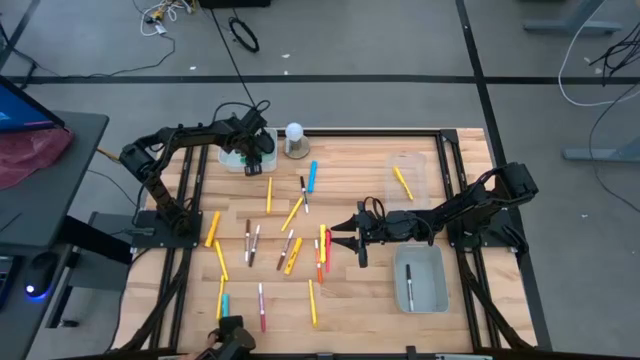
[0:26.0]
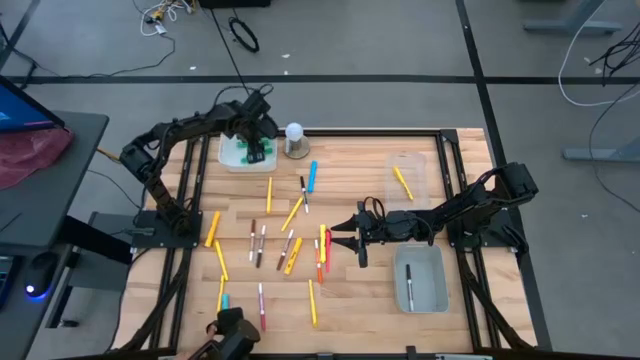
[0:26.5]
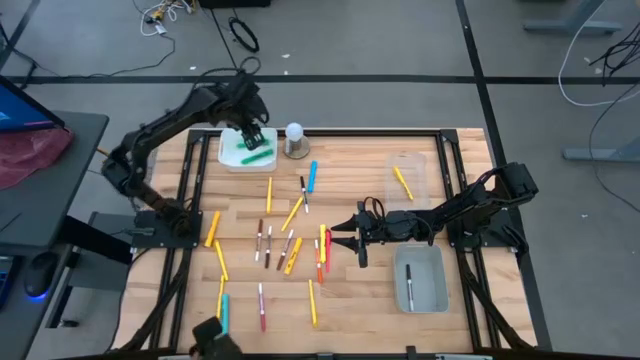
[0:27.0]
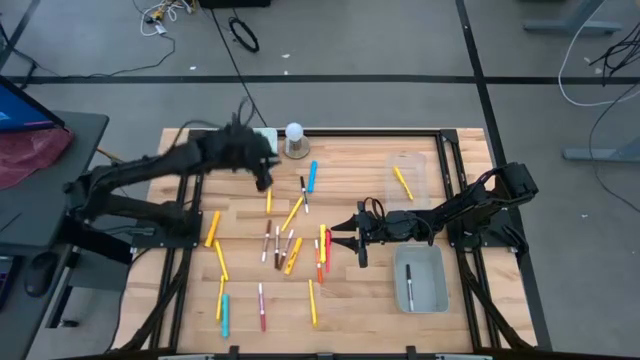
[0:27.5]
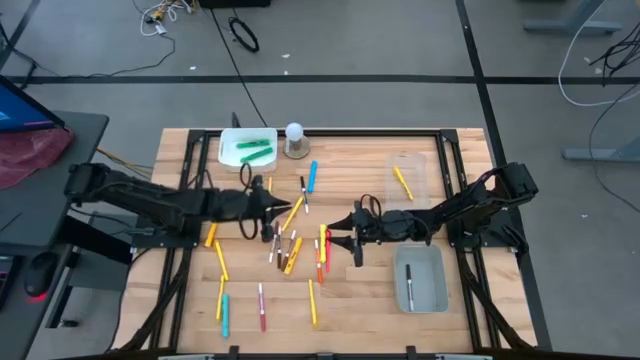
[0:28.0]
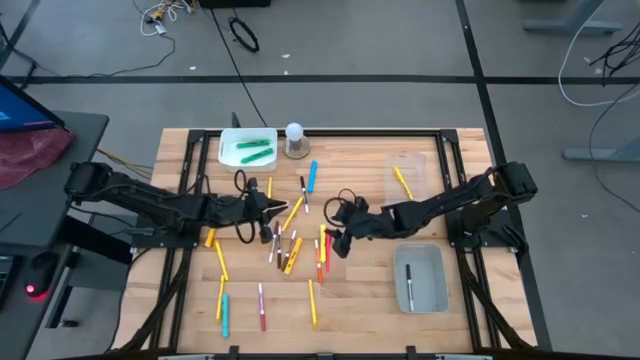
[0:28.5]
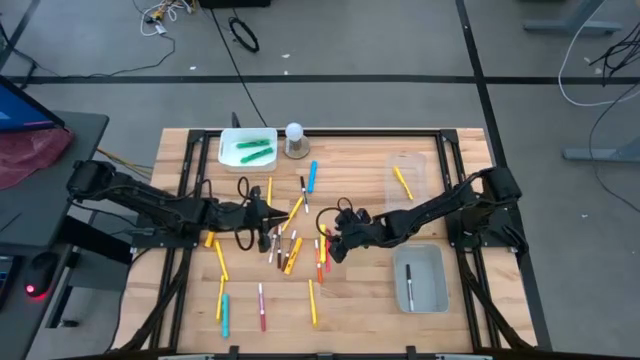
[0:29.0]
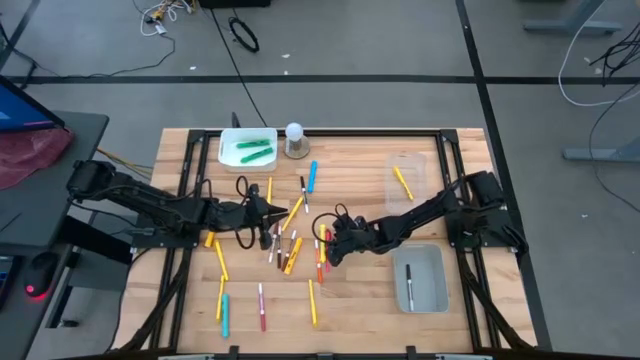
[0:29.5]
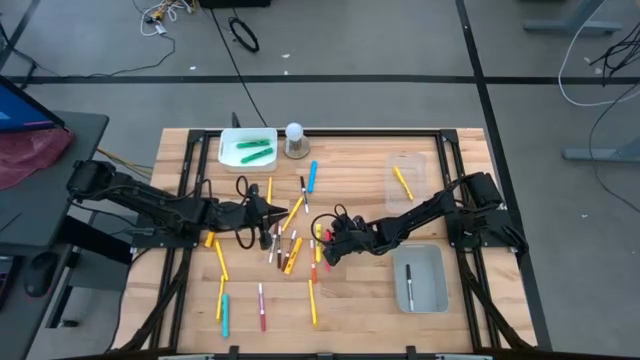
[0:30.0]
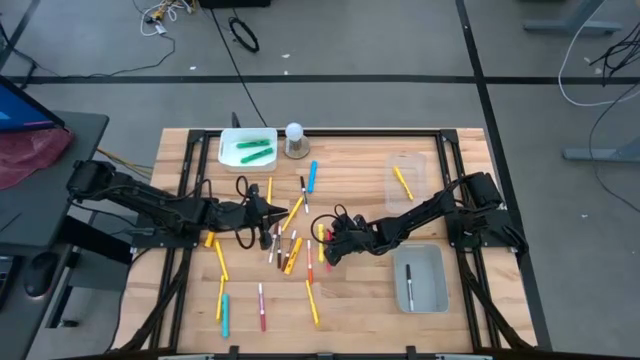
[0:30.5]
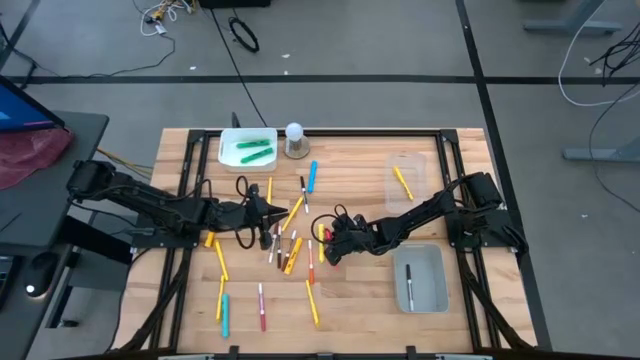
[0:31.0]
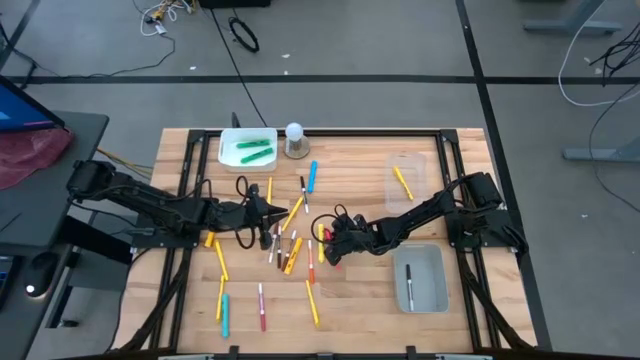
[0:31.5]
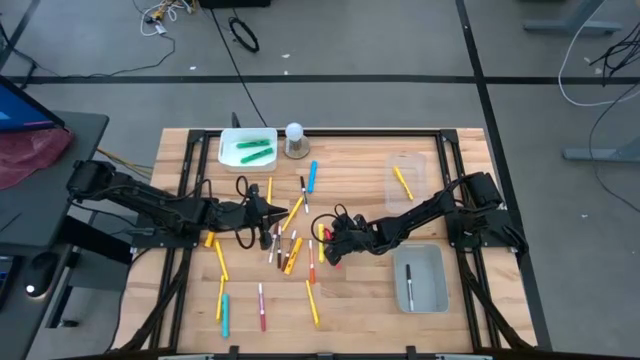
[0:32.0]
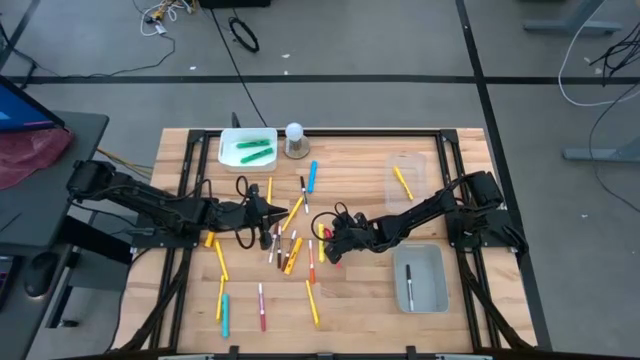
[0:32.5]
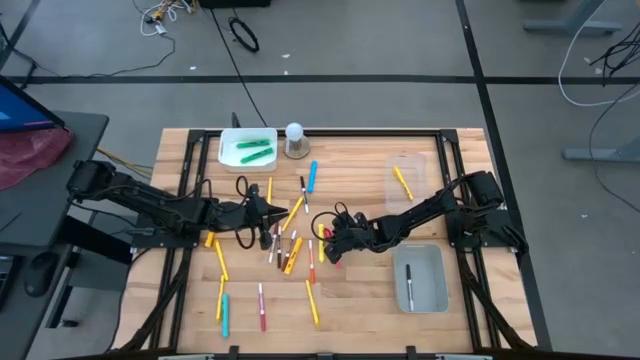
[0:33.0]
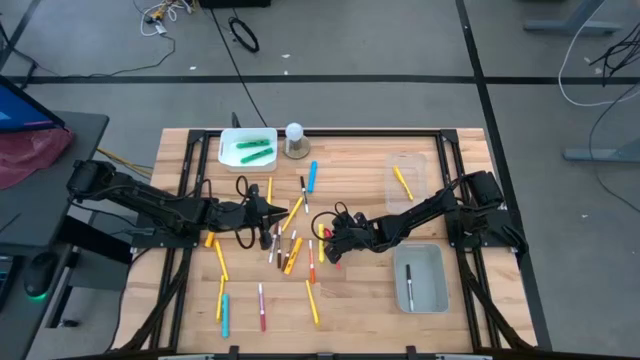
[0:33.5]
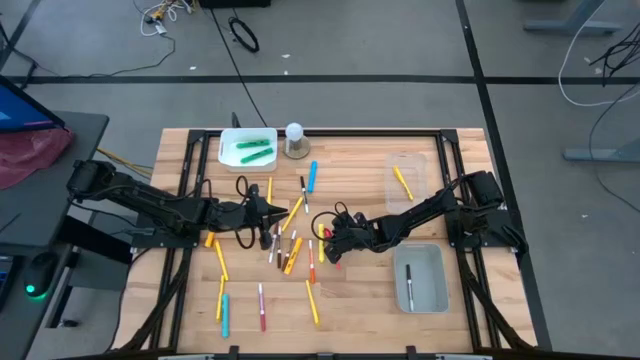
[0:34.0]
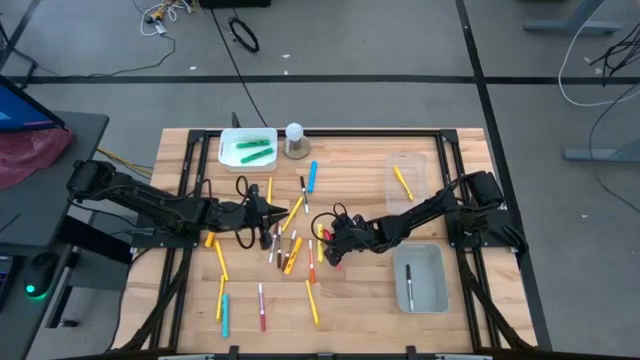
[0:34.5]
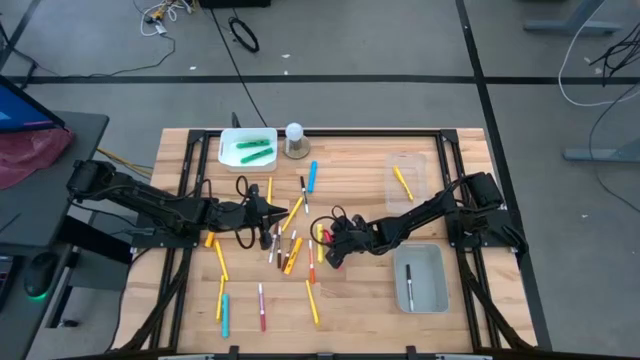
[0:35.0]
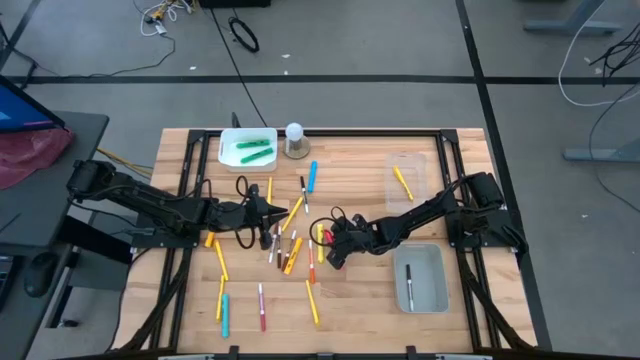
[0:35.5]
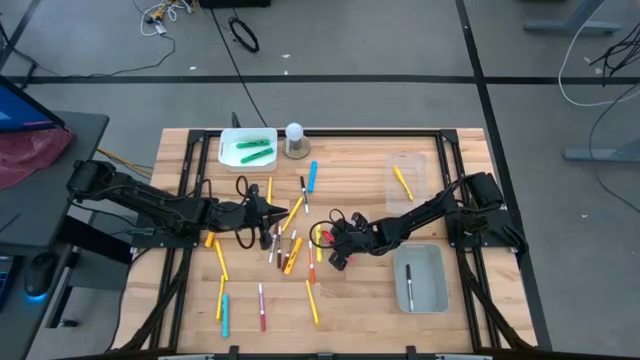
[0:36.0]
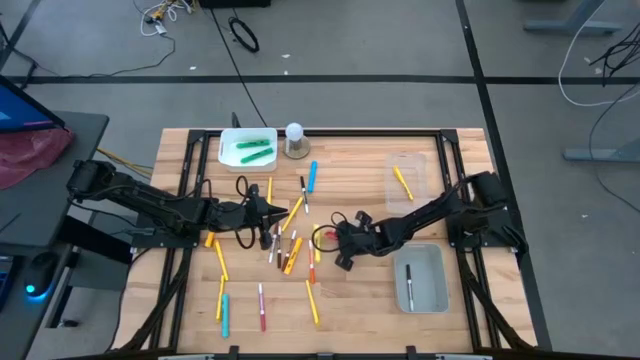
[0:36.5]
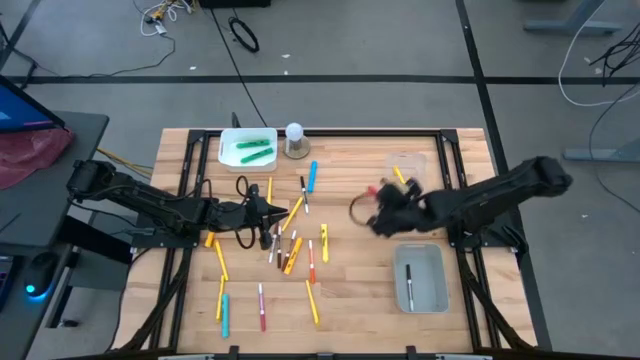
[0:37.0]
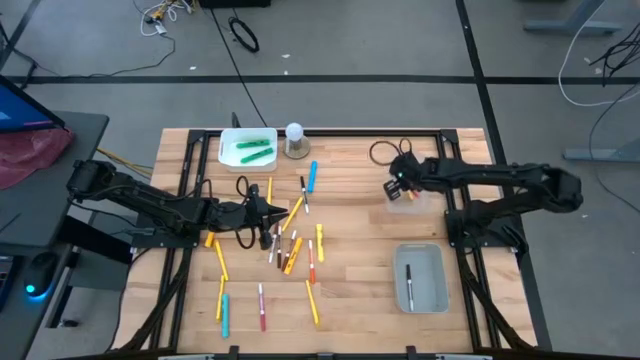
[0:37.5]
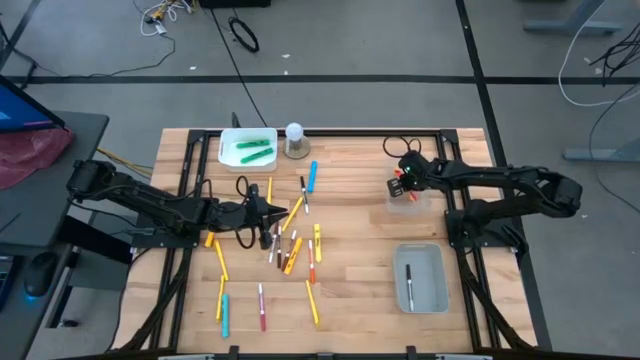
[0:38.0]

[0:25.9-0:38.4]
Task: Pick & Place Markers
Put the pink pen into the transparent bin

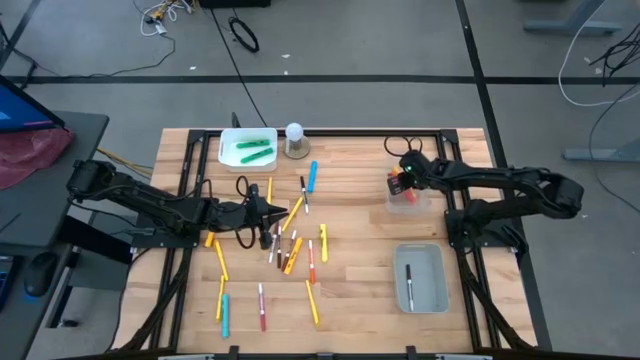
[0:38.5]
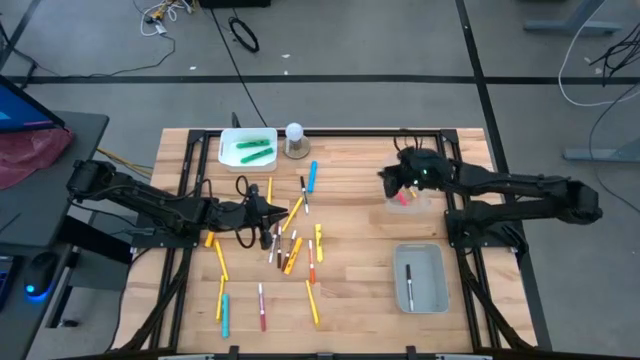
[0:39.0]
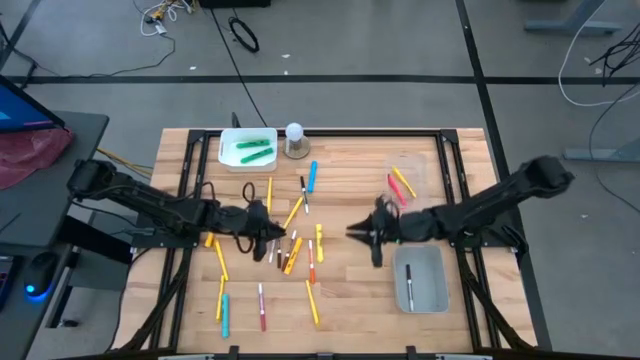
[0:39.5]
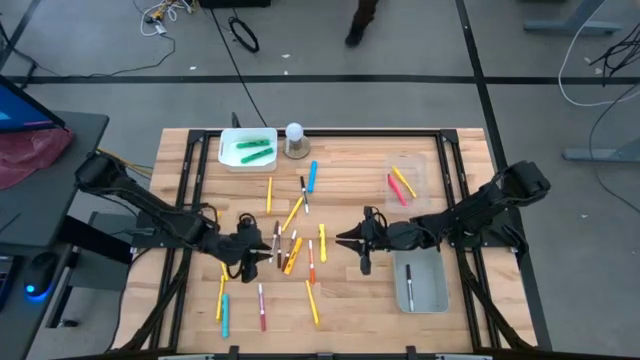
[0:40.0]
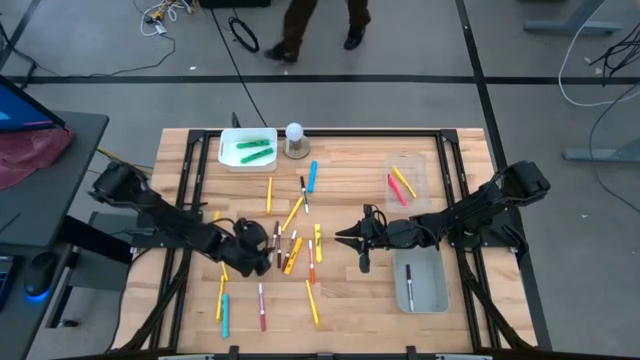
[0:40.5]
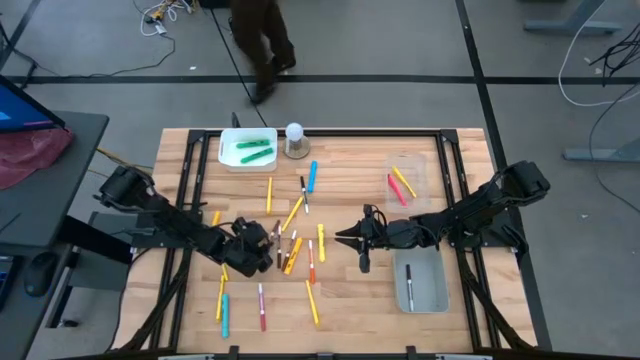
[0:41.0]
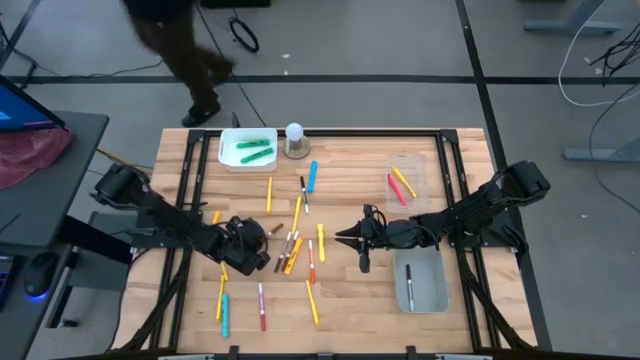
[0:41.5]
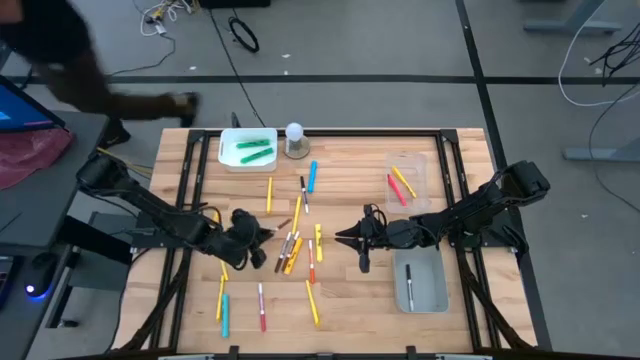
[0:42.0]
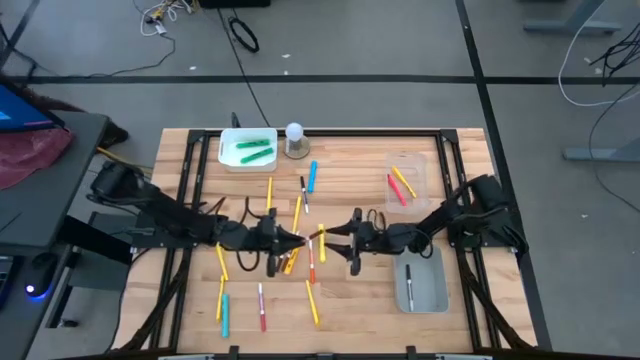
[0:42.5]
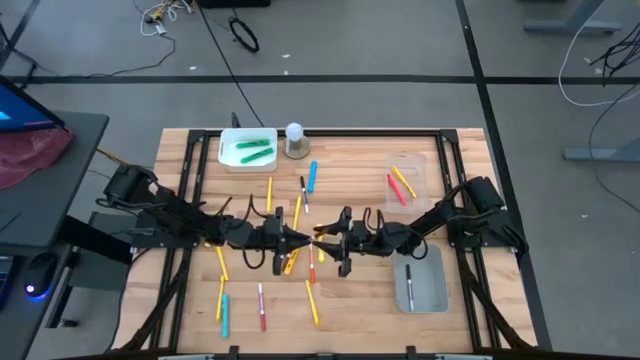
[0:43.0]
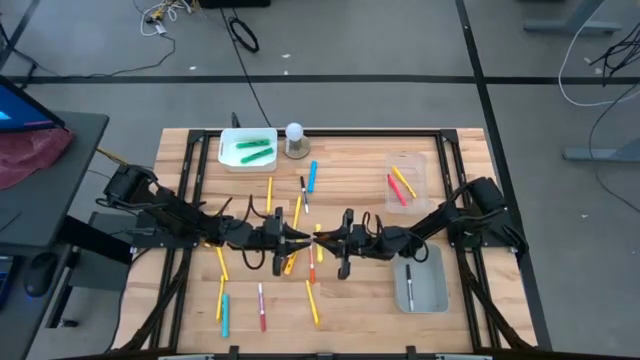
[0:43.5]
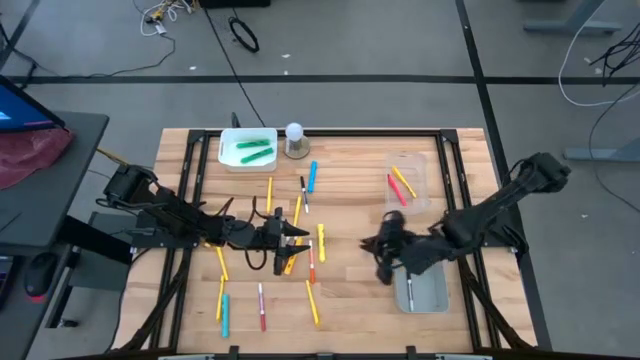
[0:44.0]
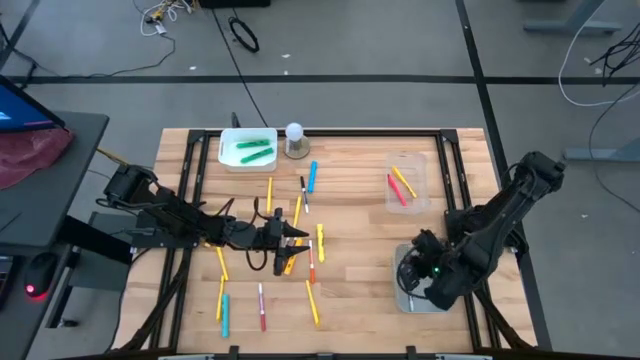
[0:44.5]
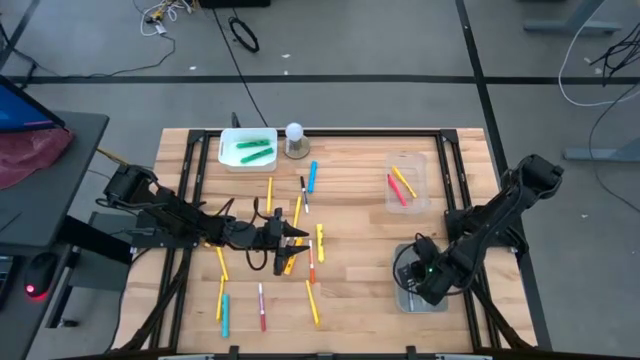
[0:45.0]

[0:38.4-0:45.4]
Put the light brown marker pen into the gray bin

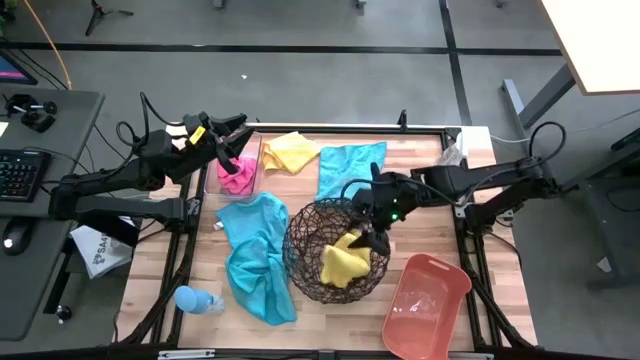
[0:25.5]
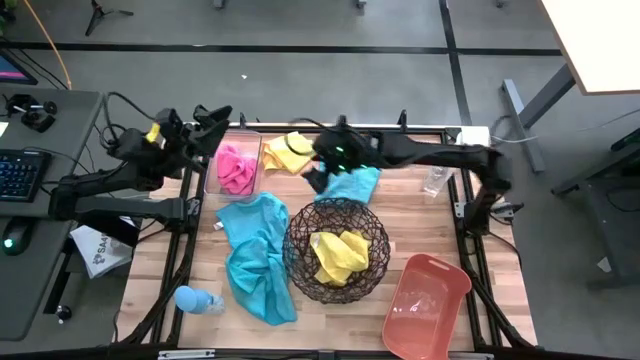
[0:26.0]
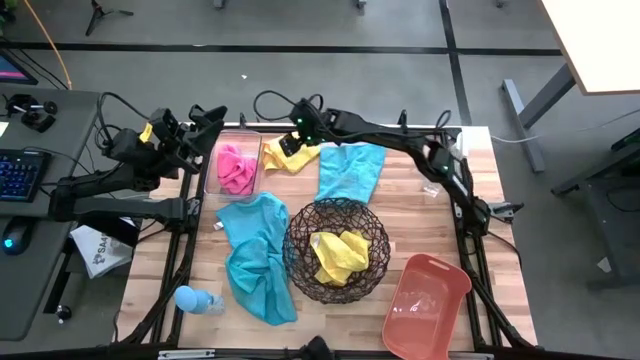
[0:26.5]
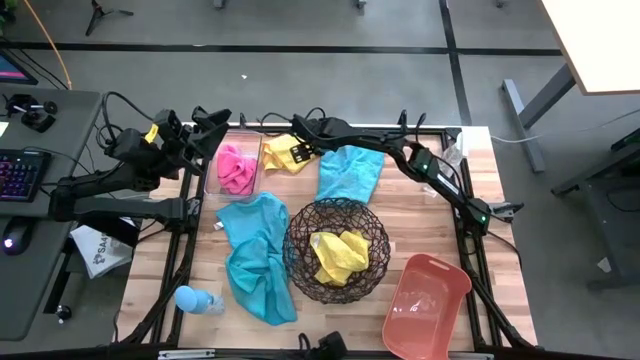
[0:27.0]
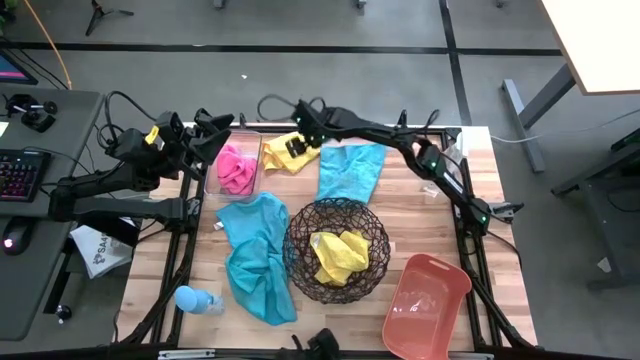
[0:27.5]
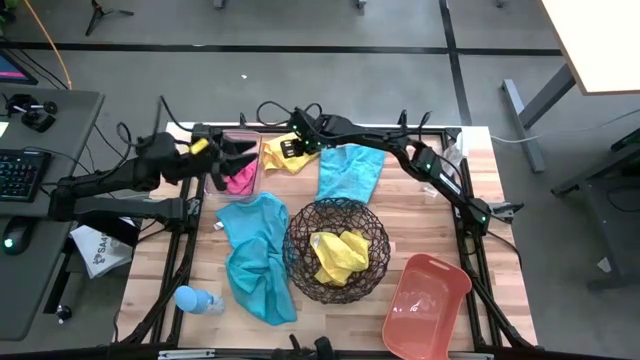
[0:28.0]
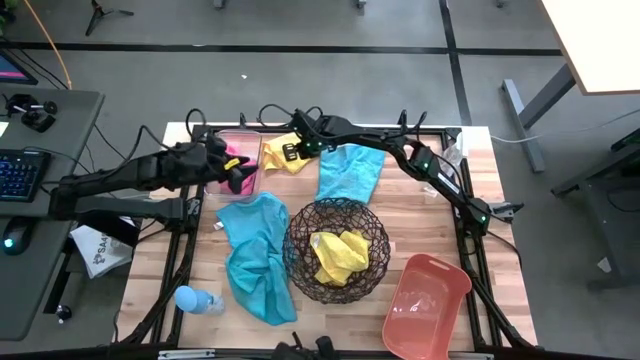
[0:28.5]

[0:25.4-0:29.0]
Task: Sort microfiber towel by color & place in baskets
Put the yellow towel into the black basket
